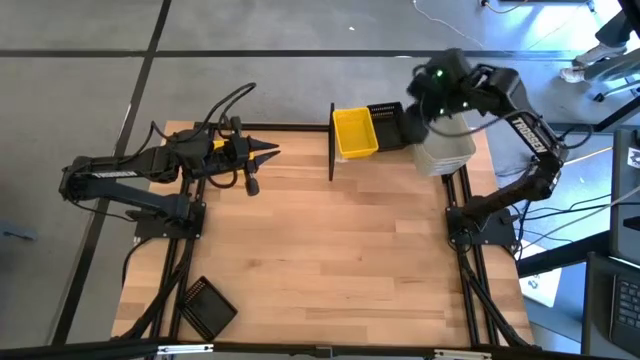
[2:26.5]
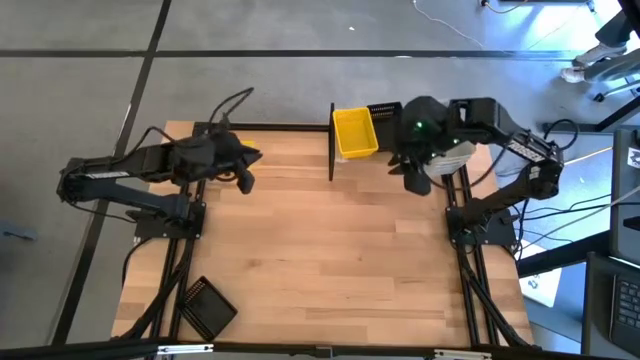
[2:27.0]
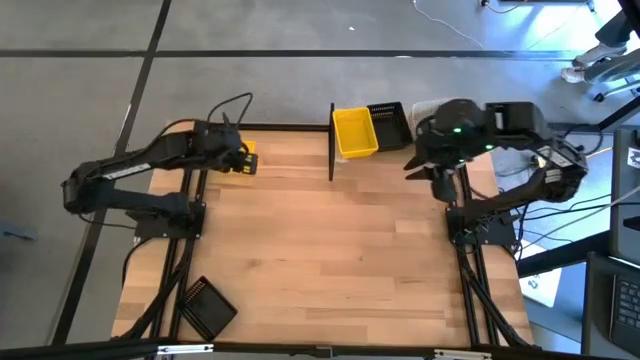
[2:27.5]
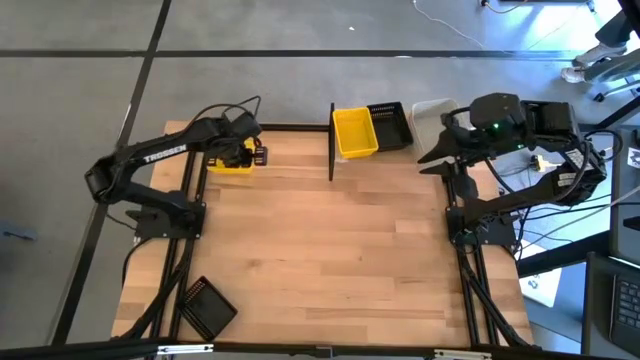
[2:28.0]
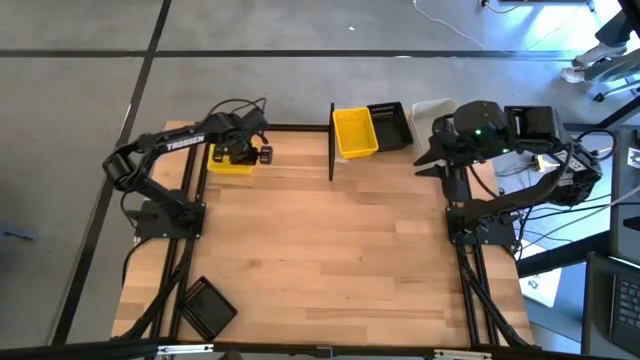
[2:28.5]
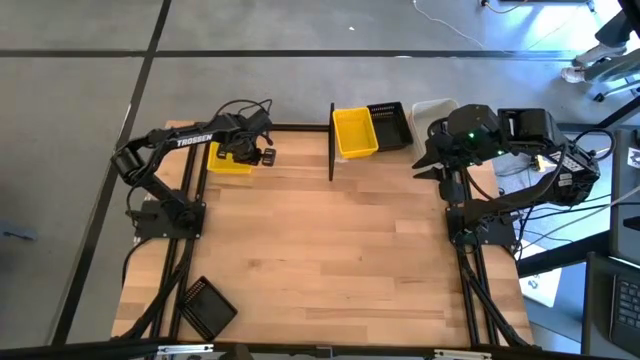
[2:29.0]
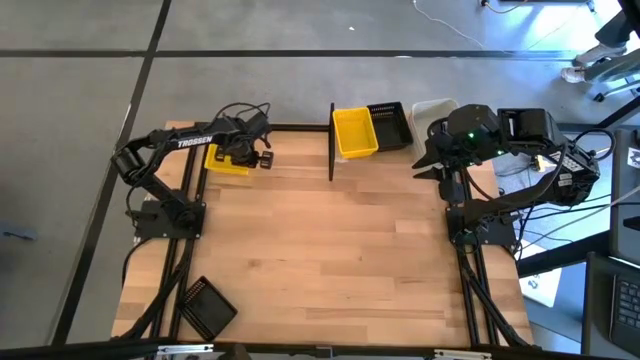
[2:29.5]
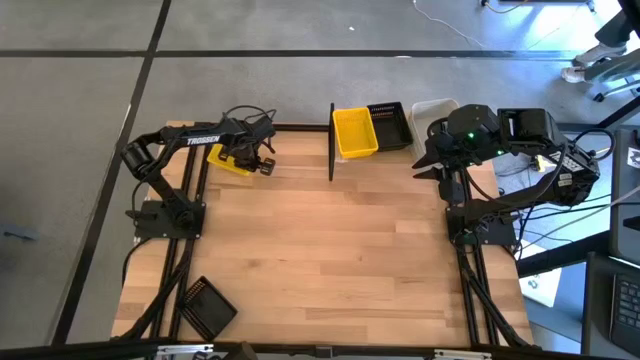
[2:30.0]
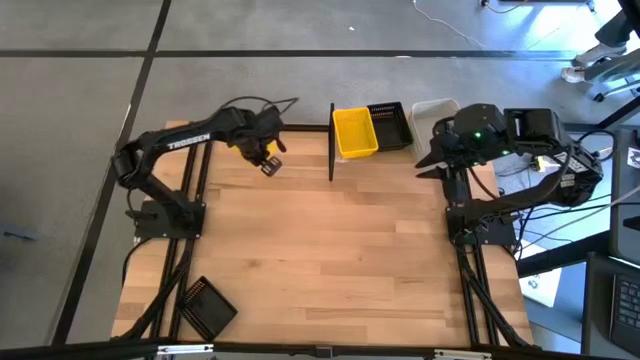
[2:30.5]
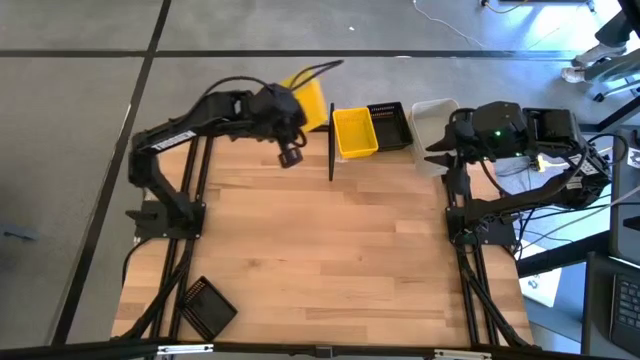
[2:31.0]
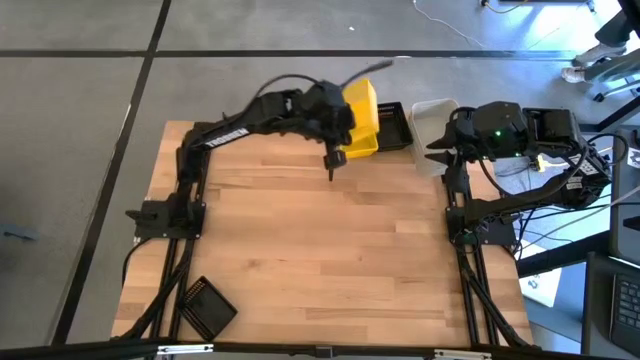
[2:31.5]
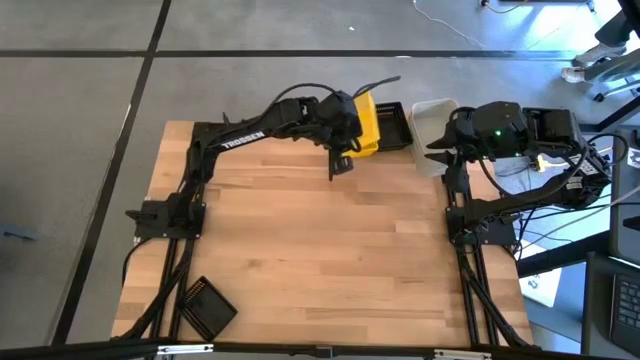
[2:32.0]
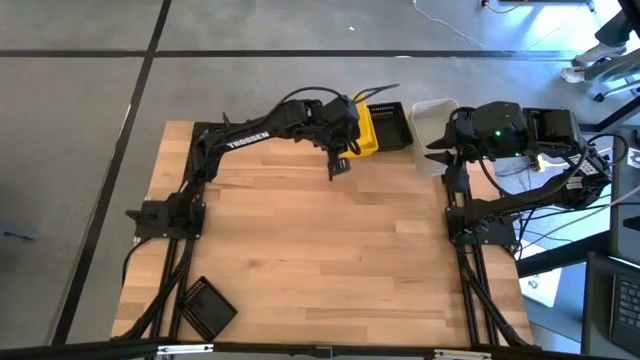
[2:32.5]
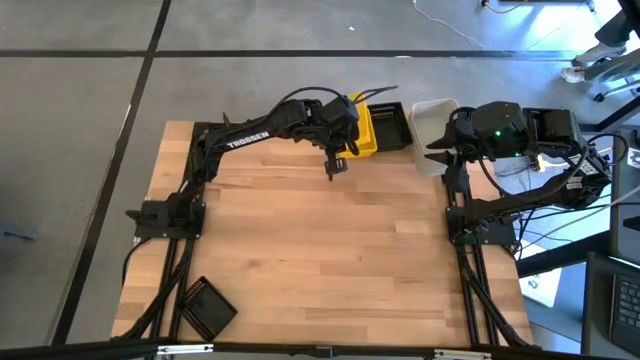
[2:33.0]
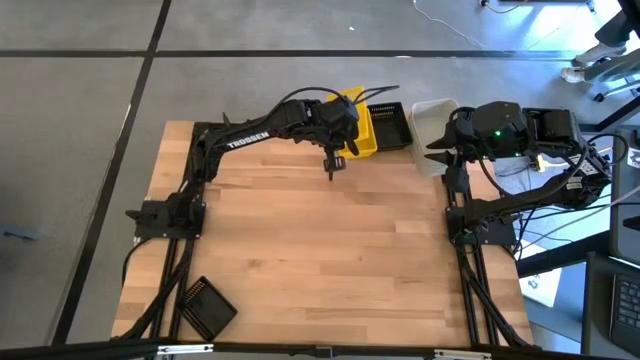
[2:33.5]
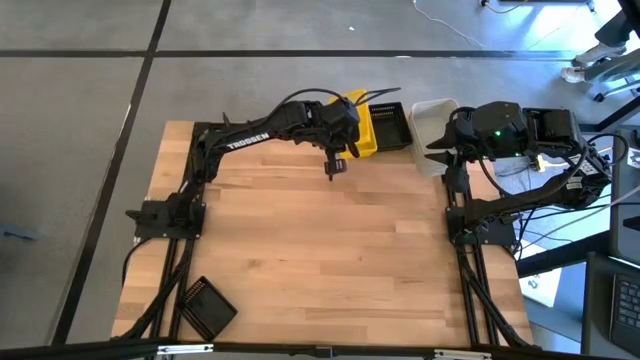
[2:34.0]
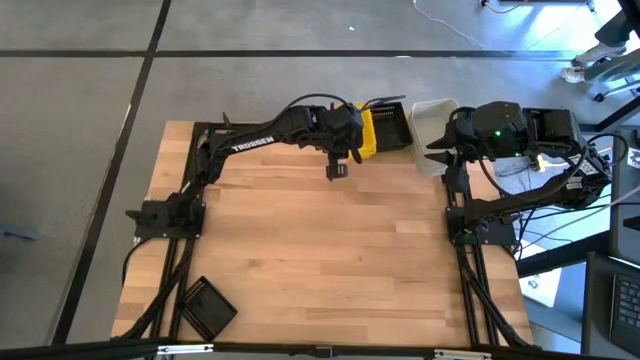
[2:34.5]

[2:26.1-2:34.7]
Task: Stack baskets on shelf by color
Stack the yellow bin on top of the yellow bin on the shelf

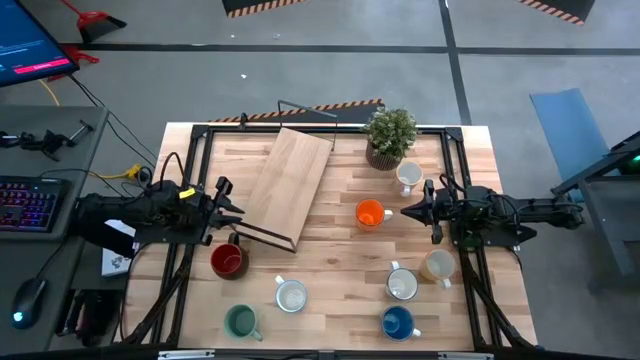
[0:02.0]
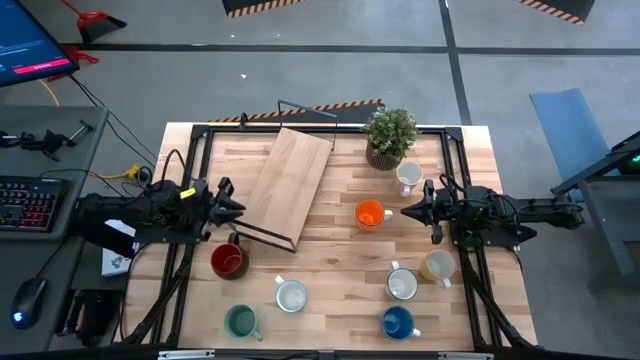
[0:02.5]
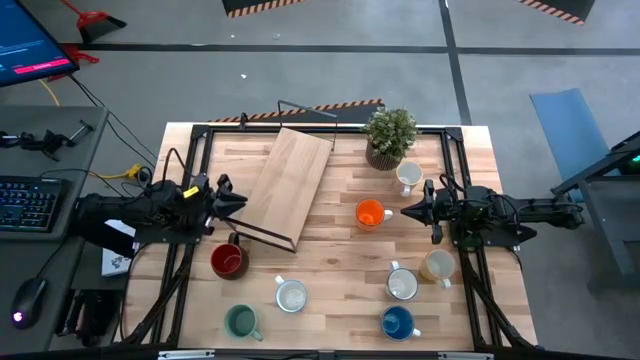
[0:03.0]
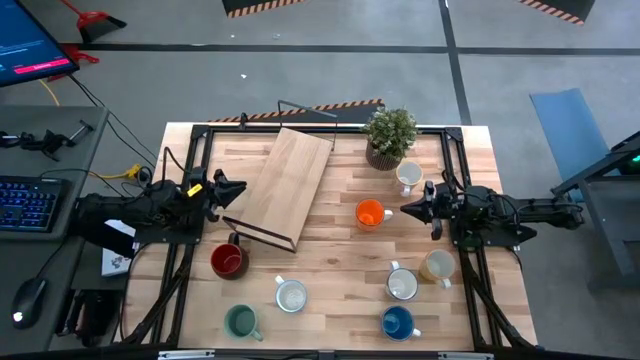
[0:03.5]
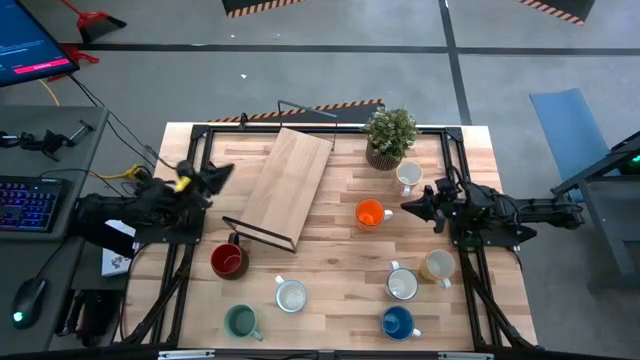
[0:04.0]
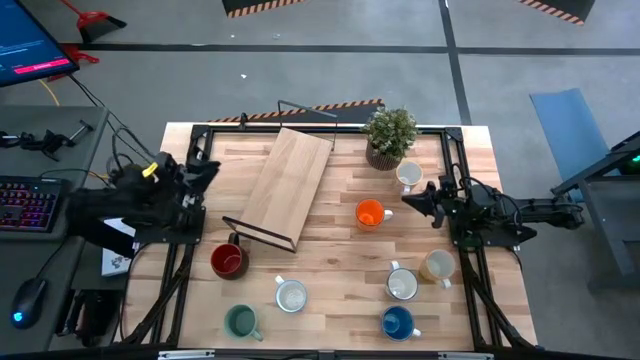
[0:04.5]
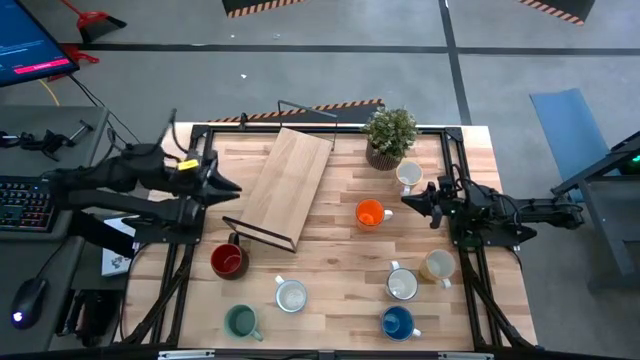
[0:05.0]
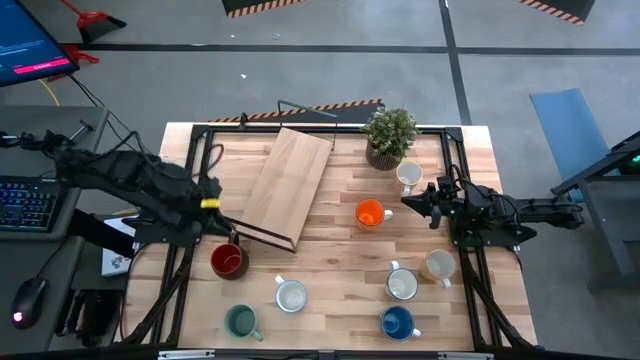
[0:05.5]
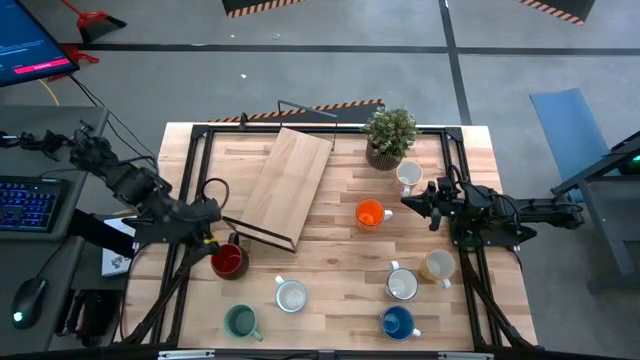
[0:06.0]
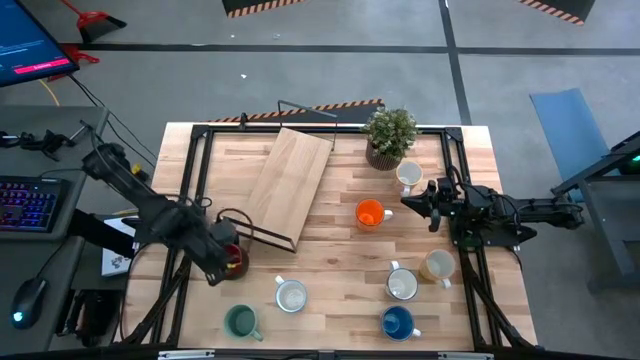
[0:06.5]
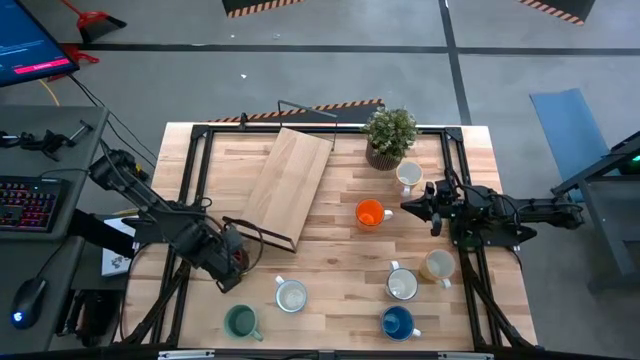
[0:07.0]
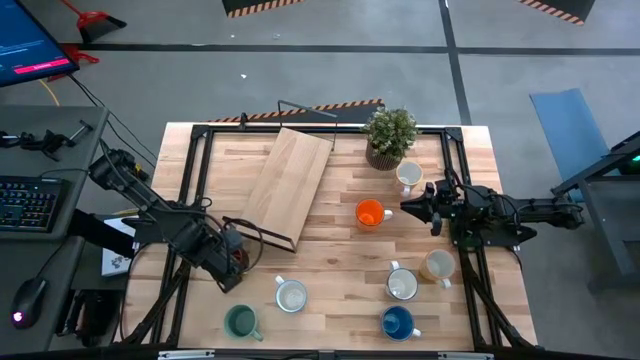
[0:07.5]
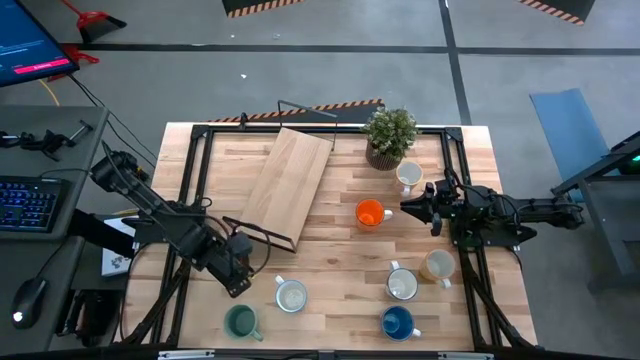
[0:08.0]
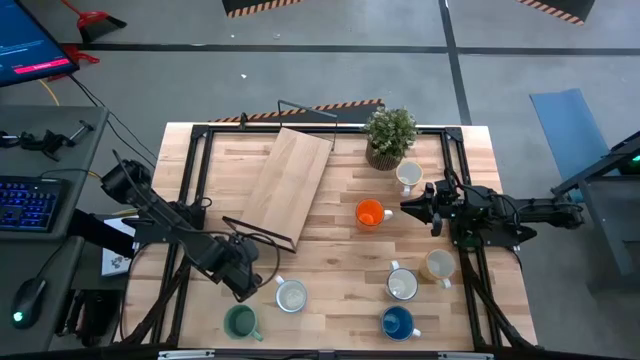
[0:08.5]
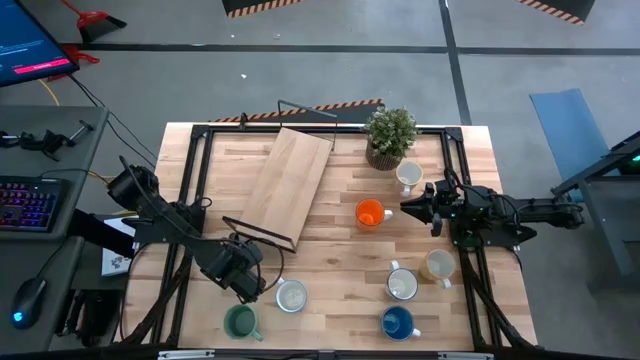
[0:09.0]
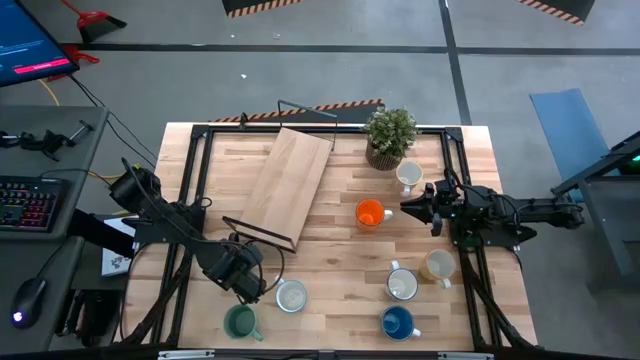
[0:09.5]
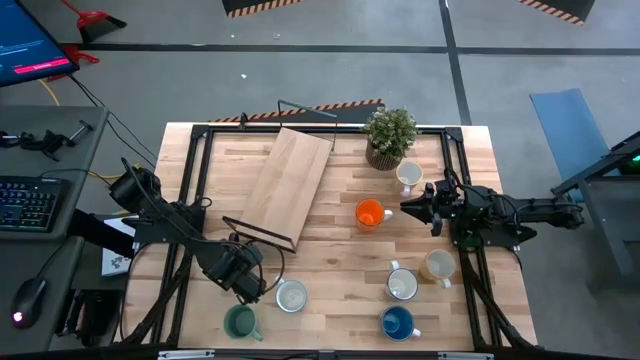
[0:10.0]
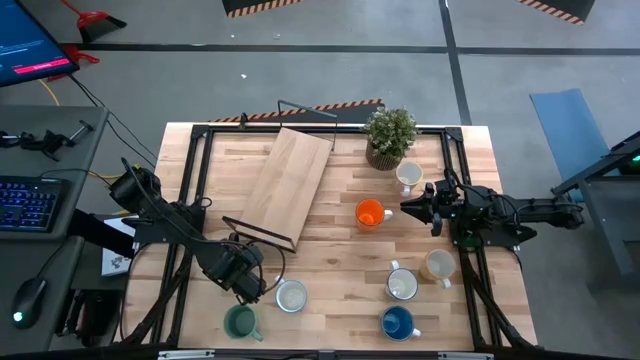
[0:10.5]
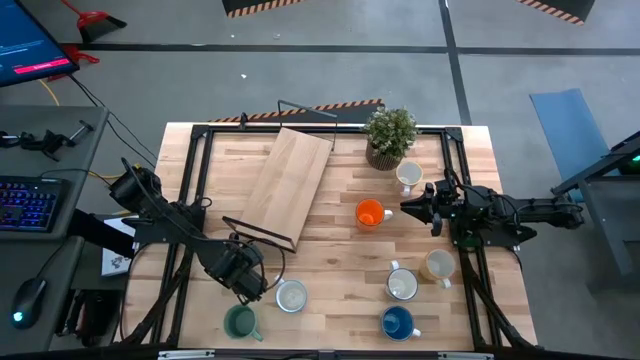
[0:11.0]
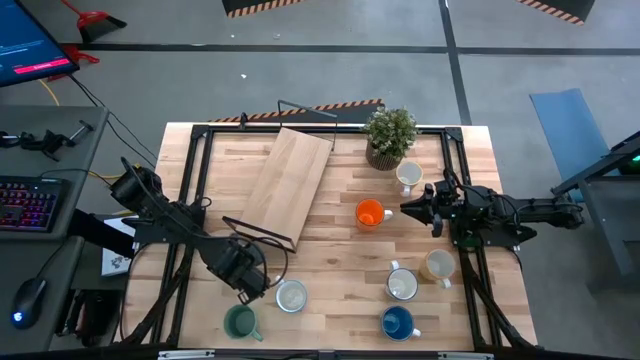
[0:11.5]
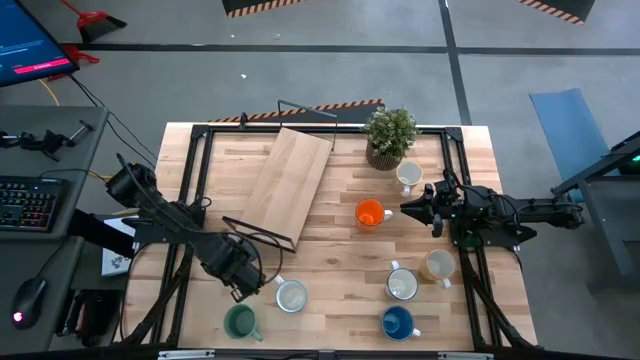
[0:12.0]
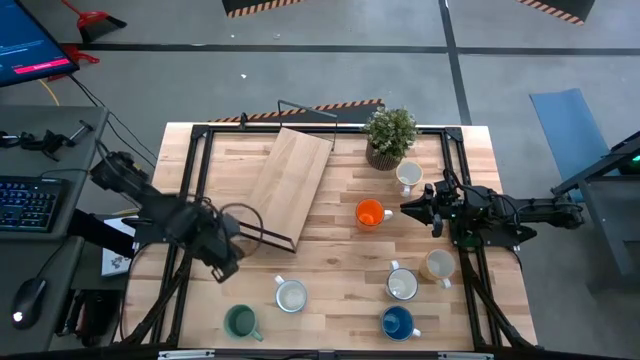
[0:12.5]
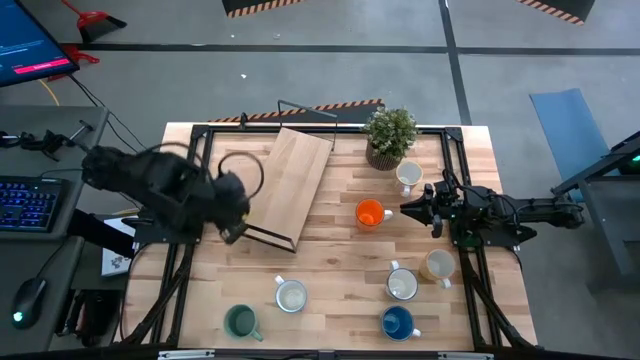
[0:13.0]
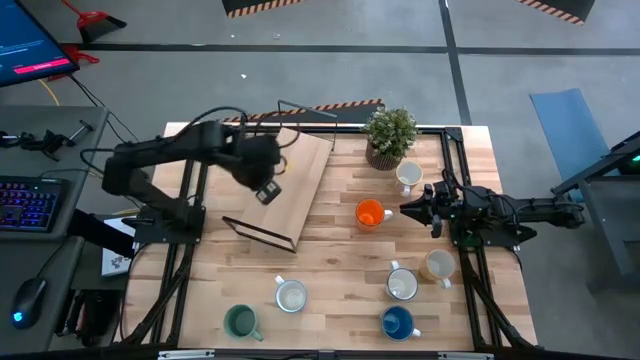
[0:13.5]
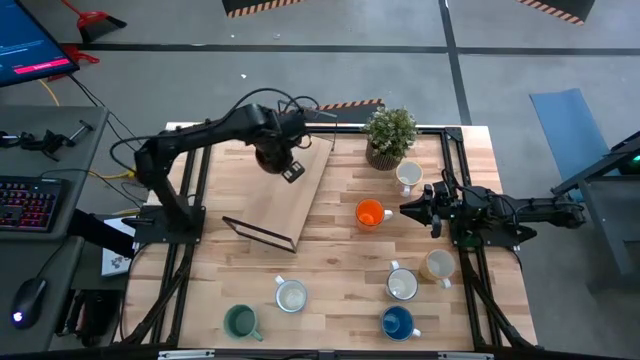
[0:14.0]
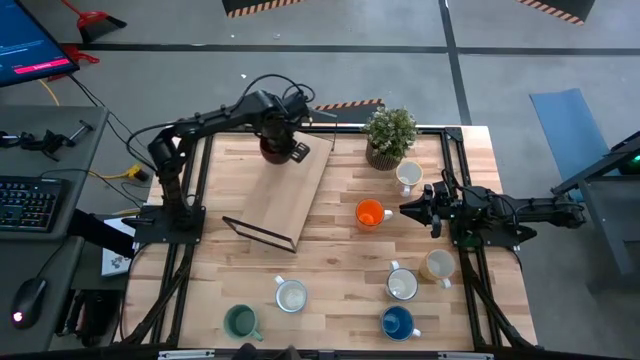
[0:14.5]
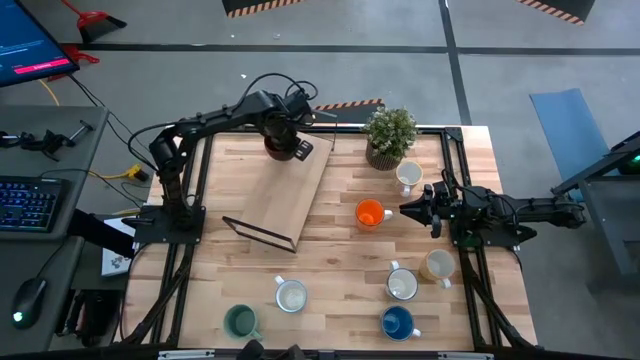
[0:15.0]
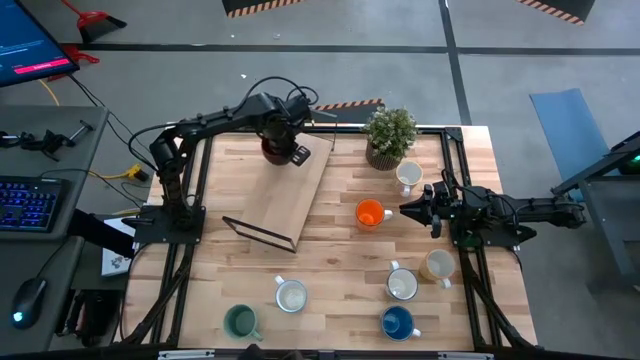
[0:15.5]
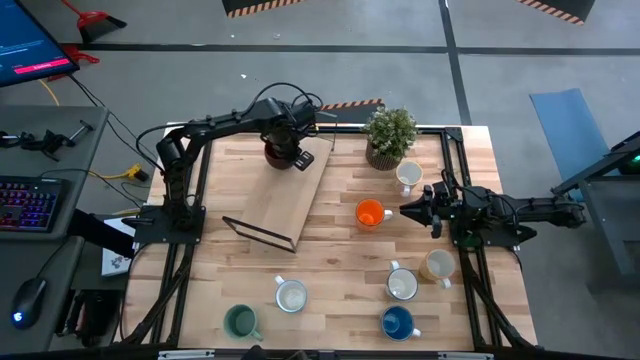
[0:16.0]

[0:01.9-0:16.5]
Task: Place coffee mugs
Put the black cup on the shelf
